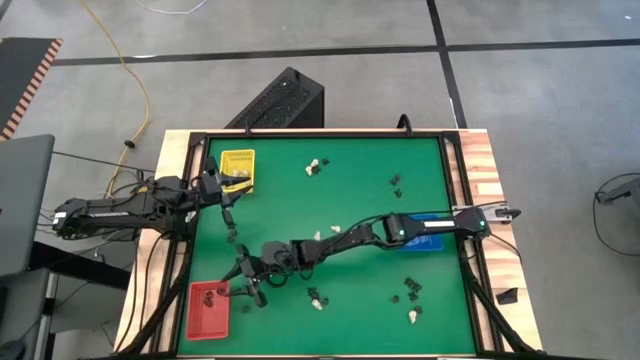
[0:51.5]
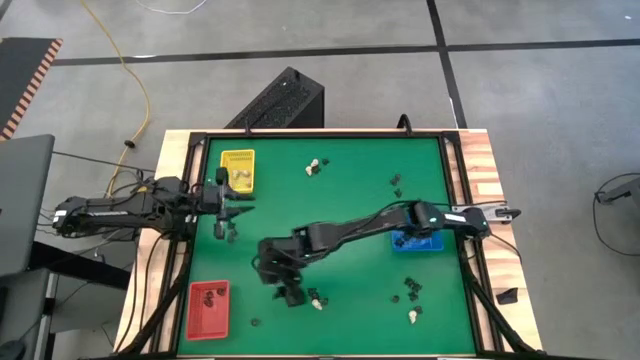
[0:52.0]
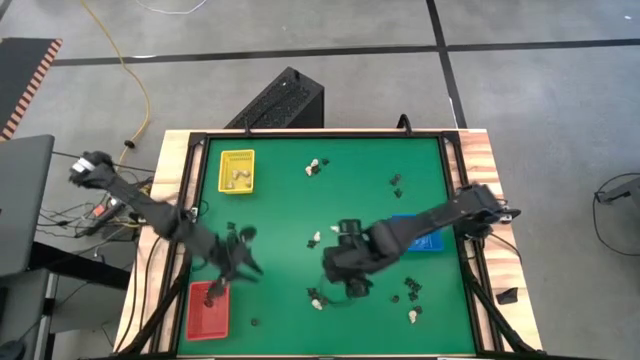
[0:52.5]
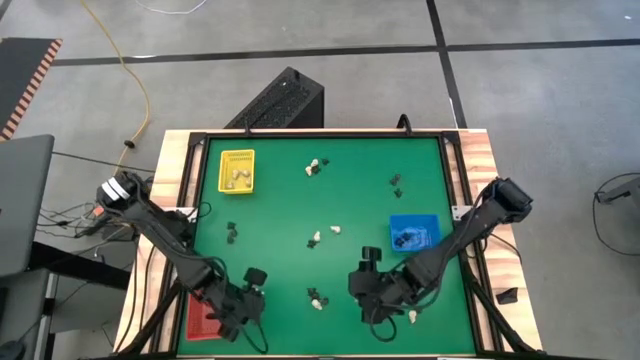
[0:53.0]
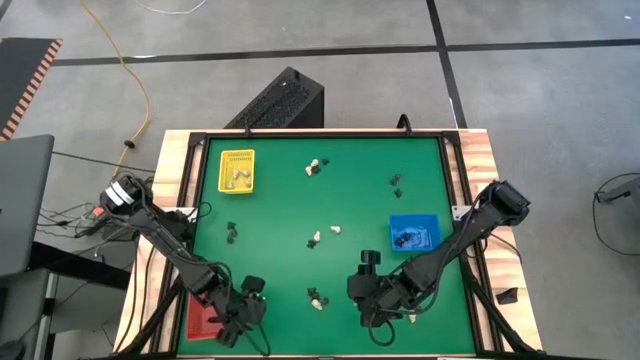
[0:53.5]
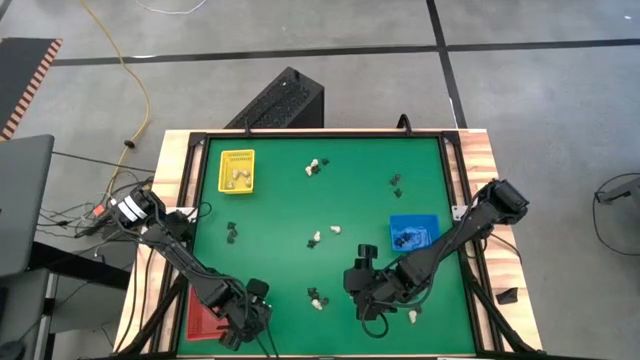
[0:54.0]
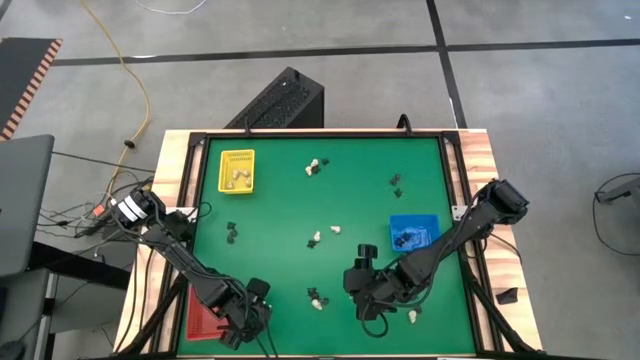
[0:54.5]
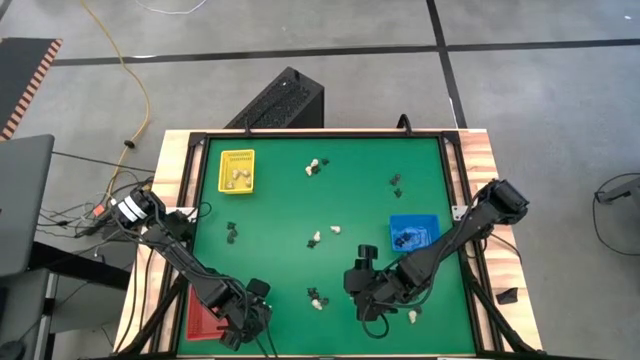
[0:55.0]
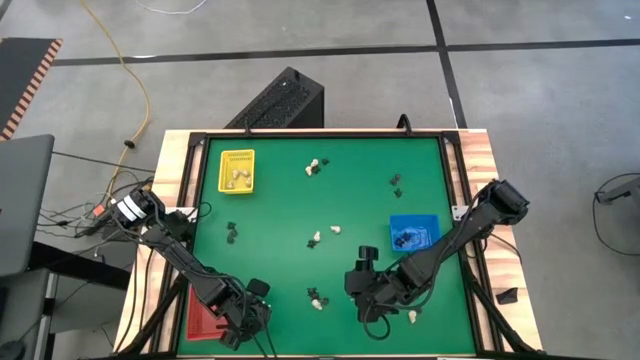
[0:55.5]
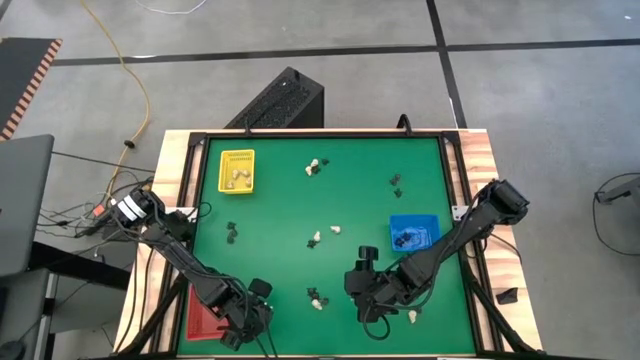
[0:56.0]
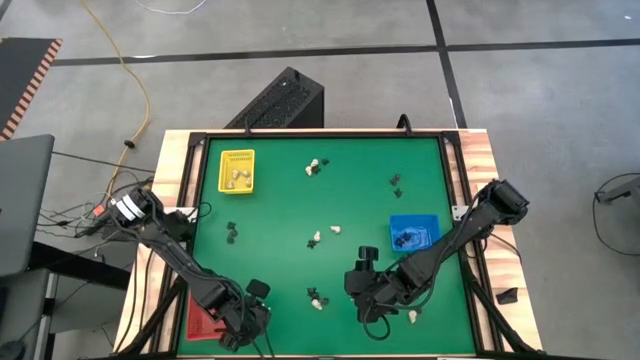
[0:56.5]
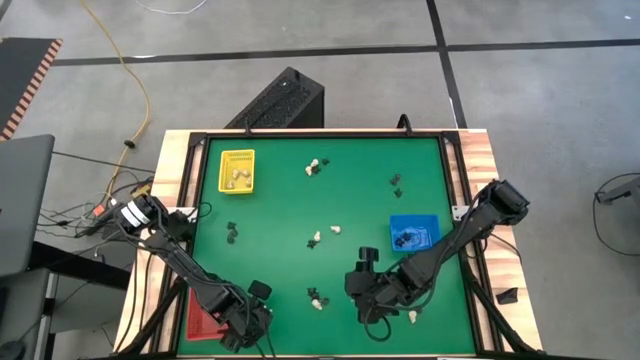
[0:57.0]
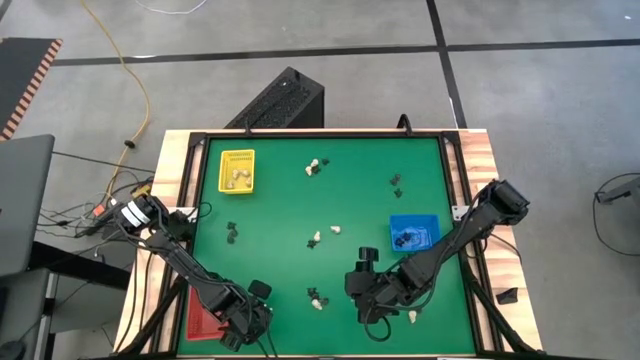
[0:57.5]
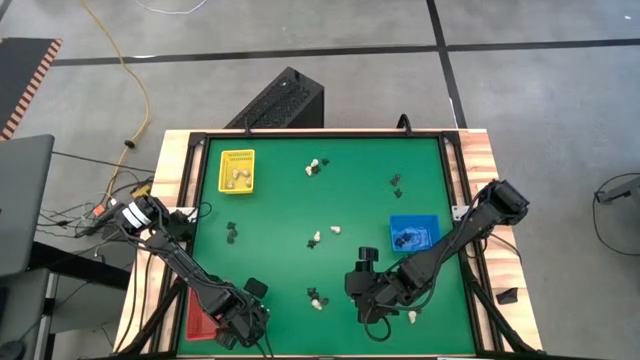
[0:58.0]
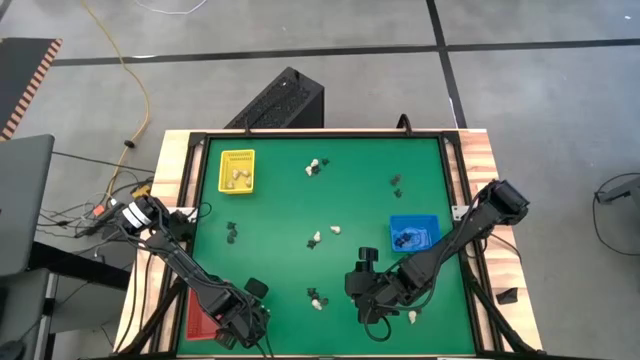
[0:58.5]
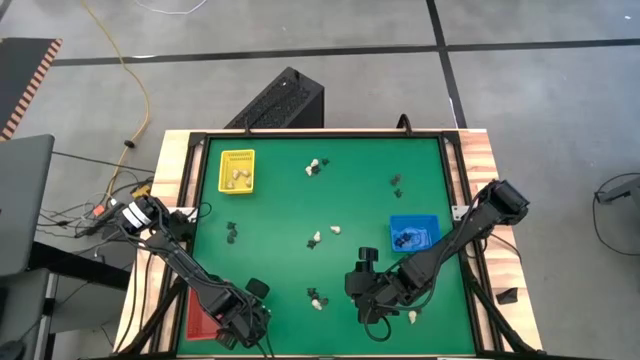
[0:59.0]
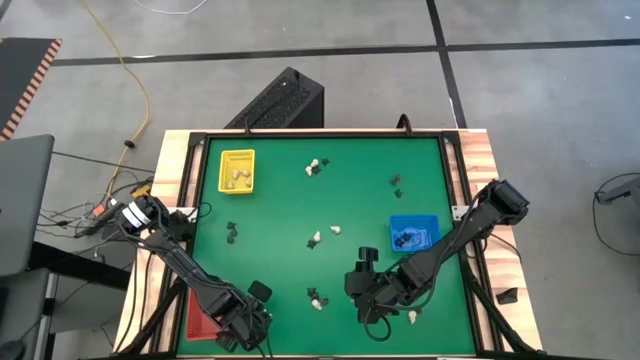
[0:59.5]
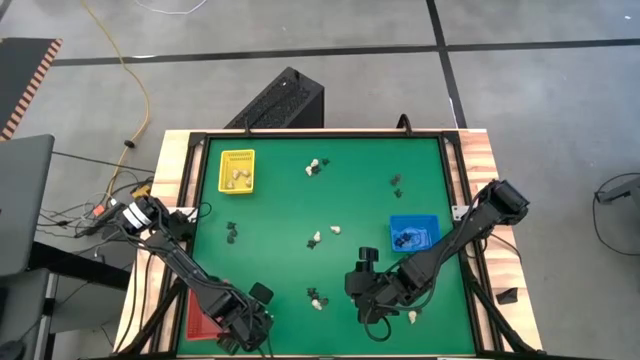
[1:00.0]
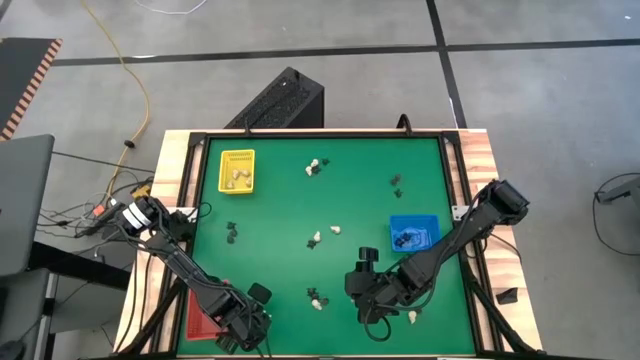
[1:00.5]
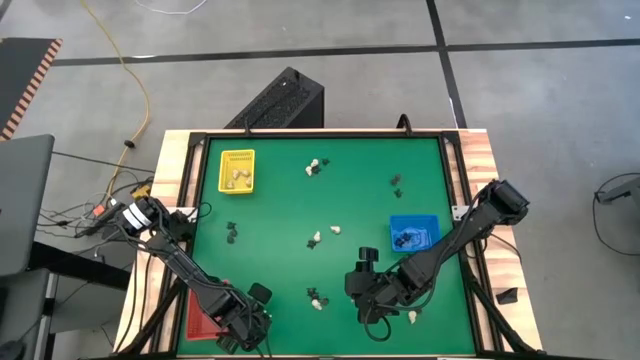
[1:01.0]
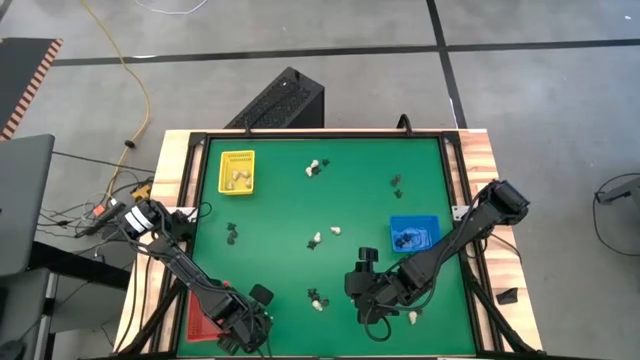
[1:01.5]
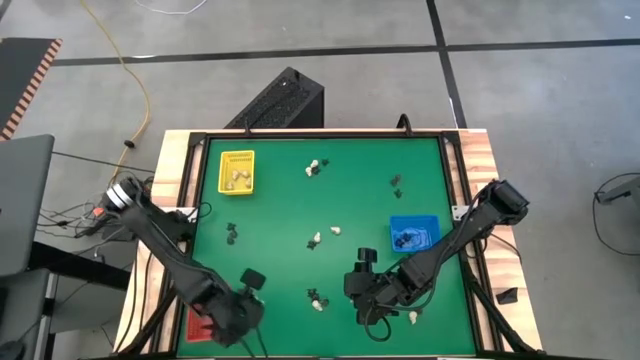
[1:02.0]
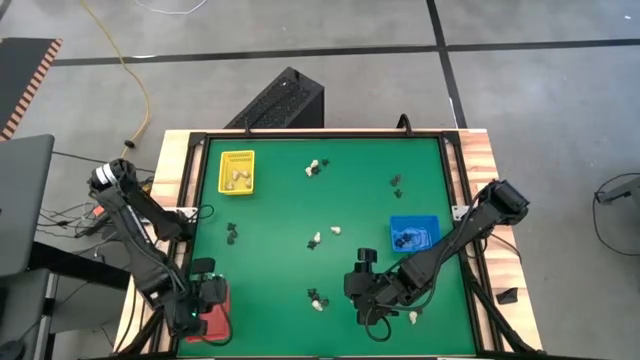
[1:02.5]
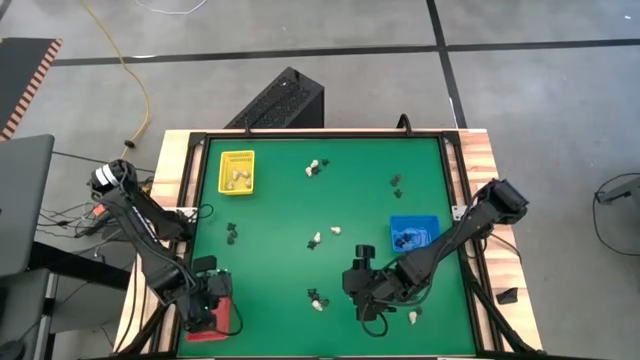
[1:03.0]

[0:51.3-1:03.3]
Task: Sort Halloween decoration
Put the black skull toy into the red bin

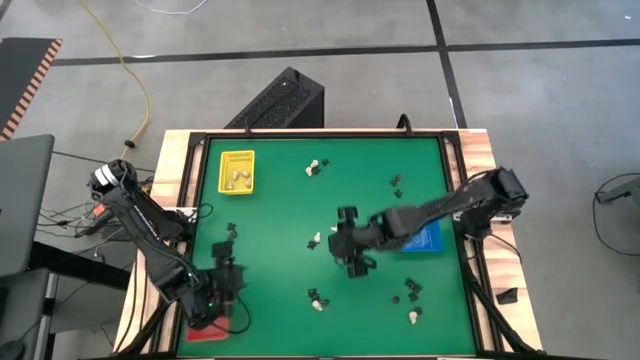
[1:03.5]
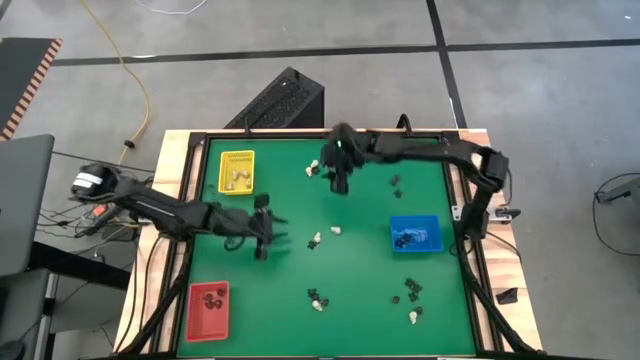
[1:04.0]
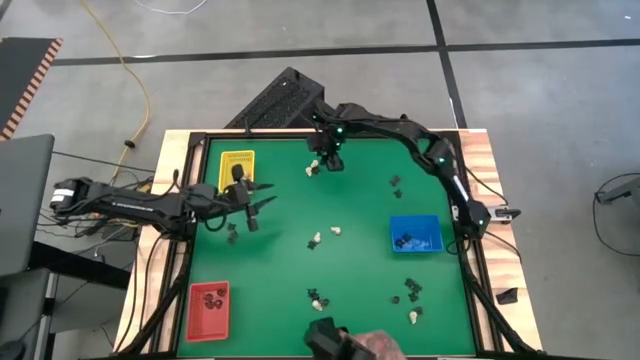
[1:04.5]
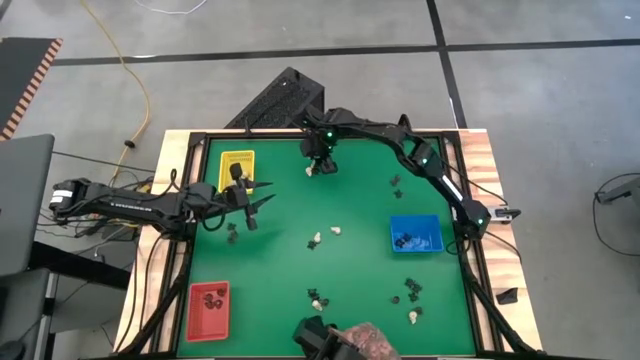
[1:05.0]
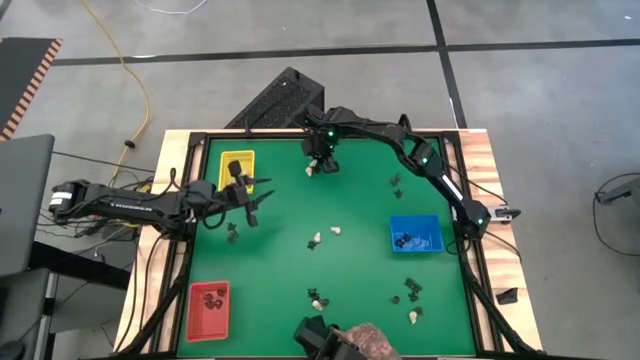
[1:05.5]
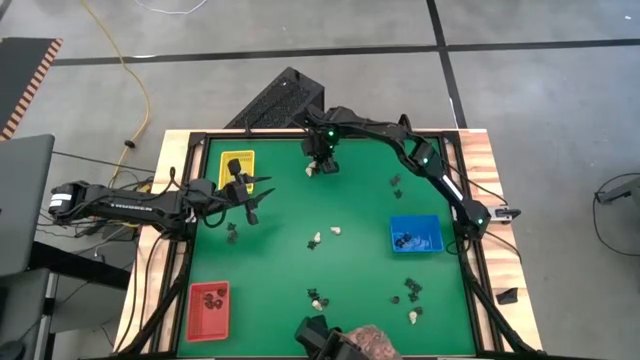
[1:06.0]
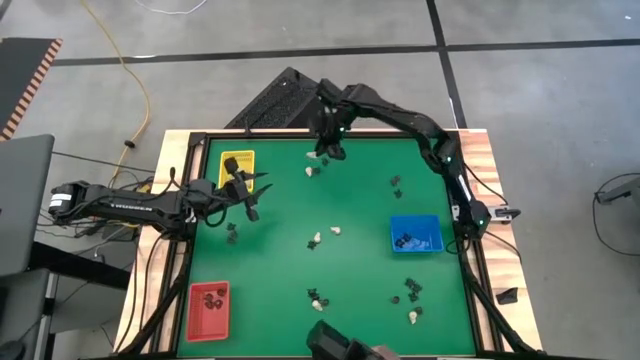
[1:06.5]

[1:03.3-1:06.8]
Put the white skull toy into the yellow bin

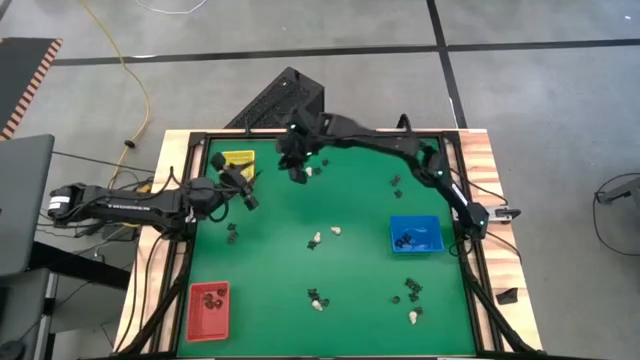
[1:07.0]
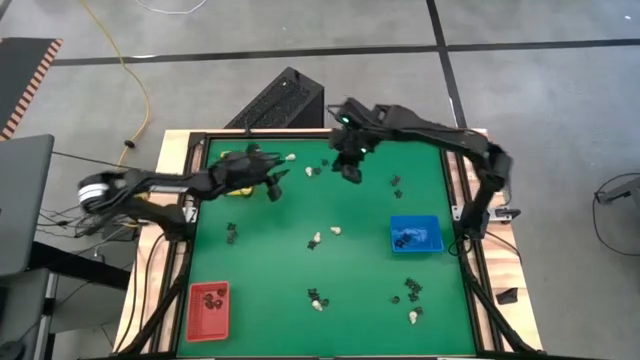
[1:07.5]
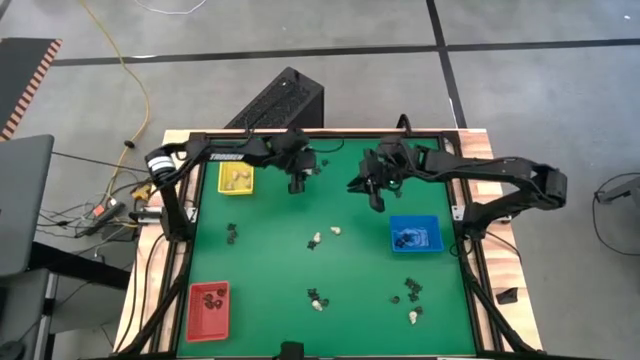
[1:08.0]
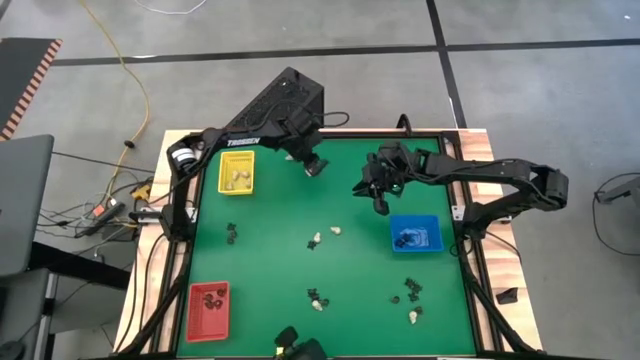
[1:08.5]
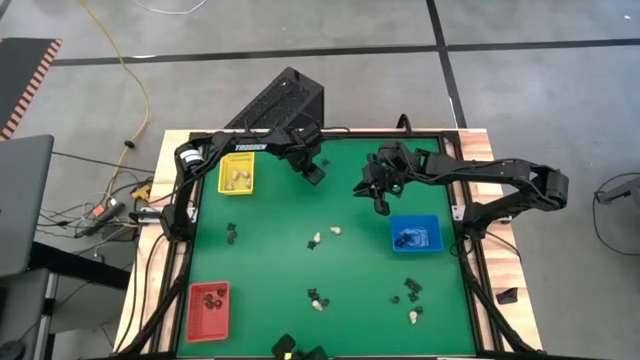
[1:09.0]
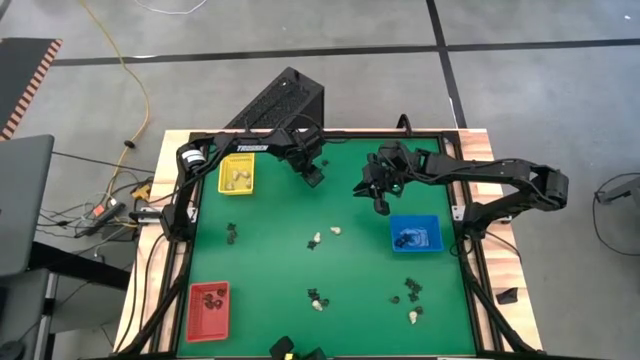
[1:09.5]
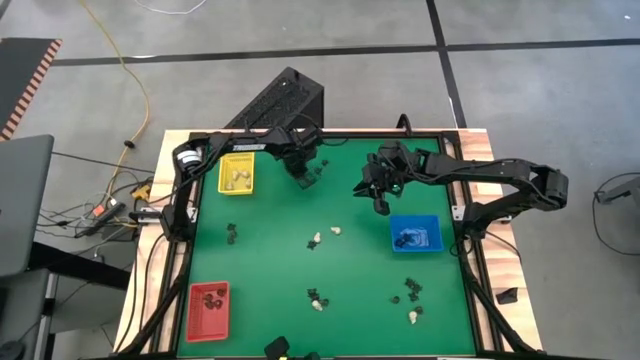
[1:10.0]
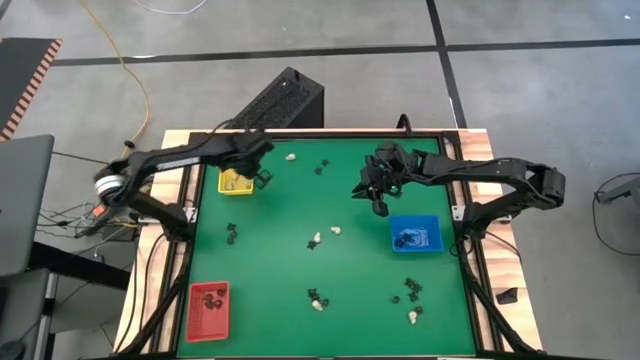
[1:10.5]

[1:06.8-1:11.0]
Put the white skull toy into the yellow bin

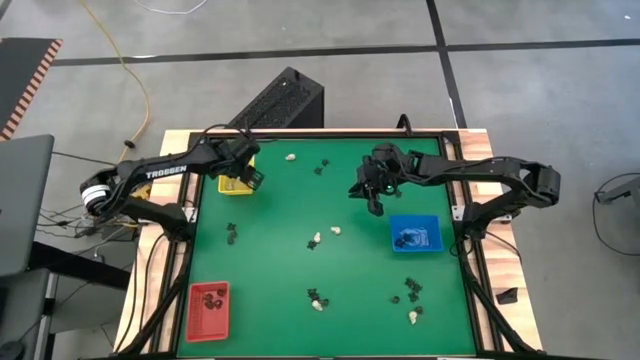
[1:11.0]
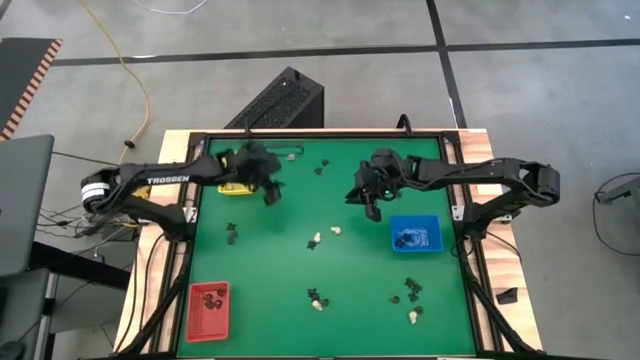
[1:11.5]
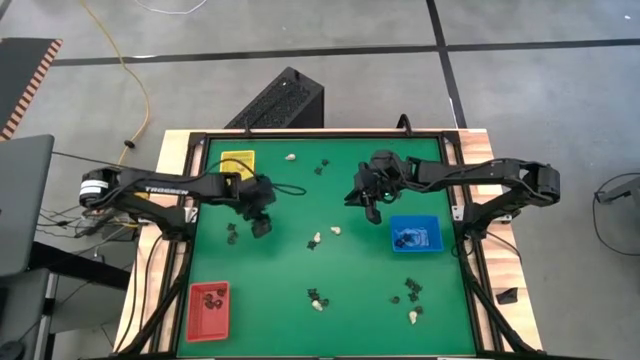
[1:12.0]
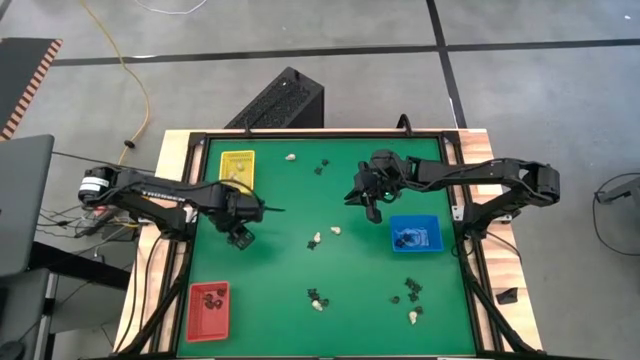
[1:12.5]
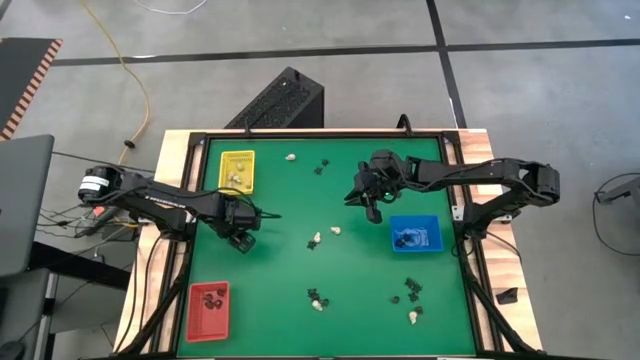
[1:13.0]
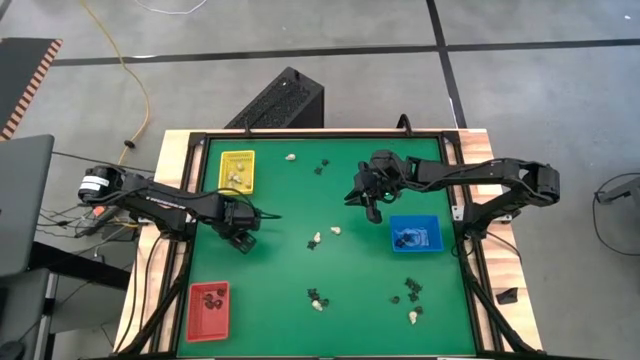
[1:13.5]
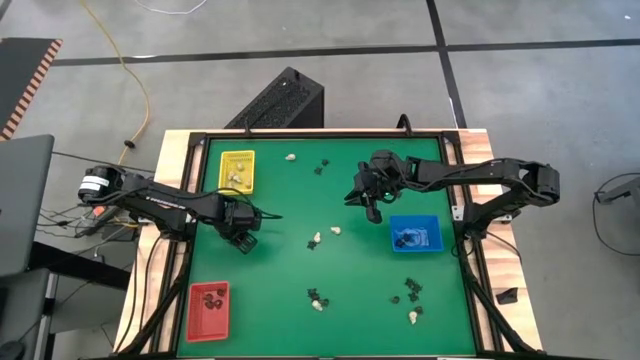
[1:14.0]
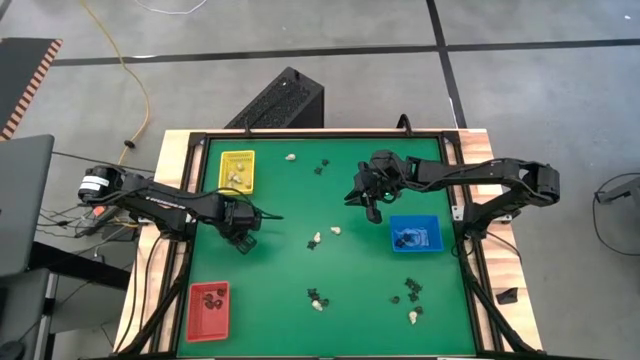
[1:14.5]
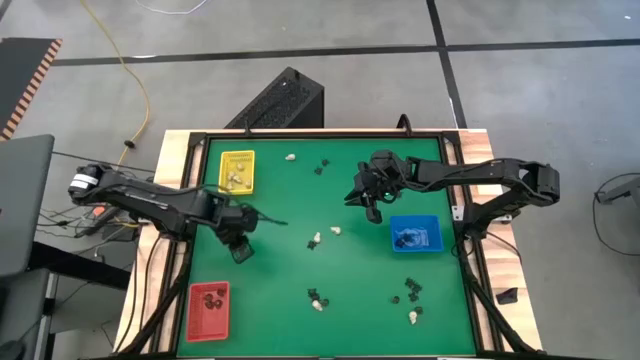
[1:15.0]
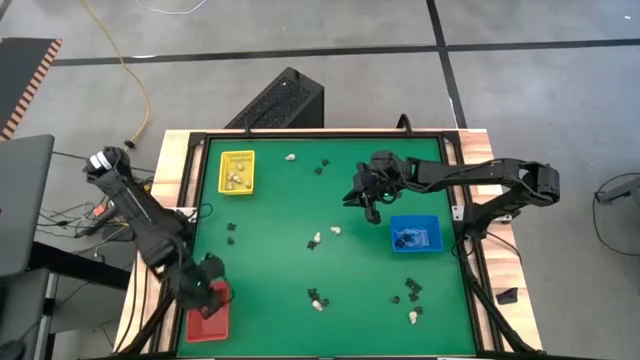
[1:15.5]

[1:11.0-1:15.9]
Put the black skull toy into the red bin
